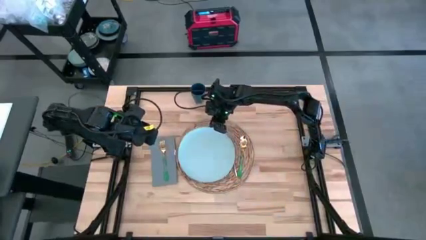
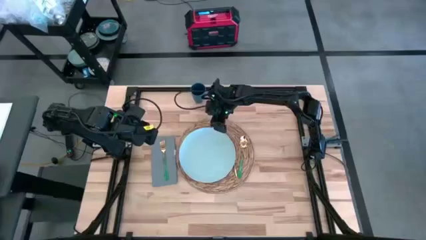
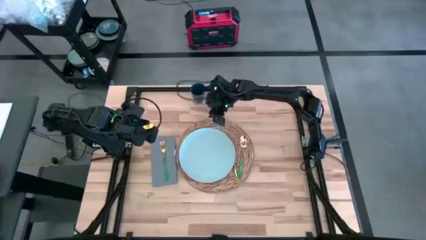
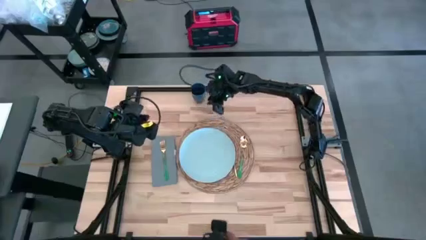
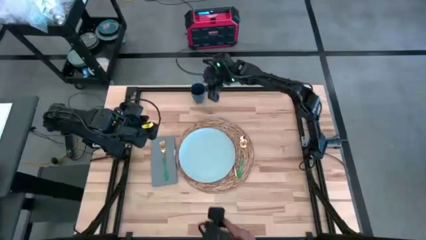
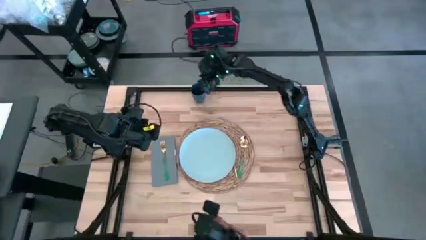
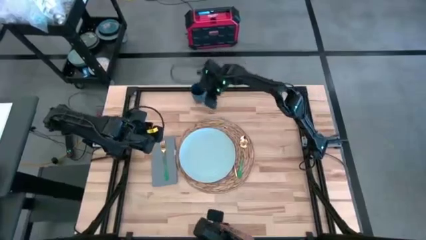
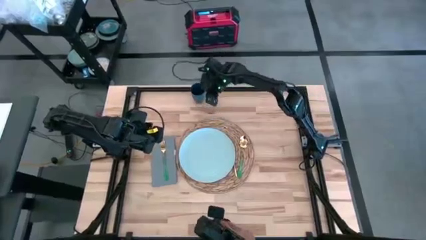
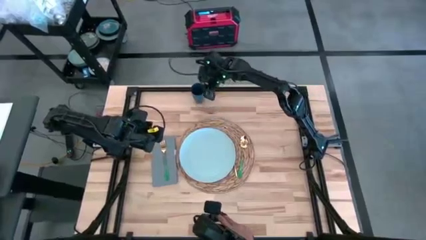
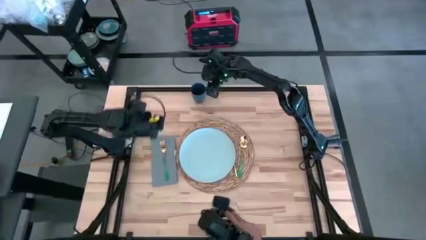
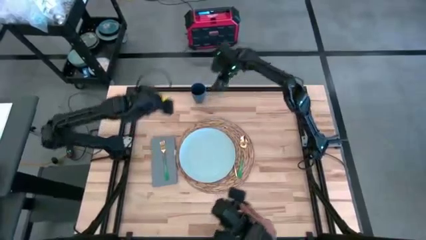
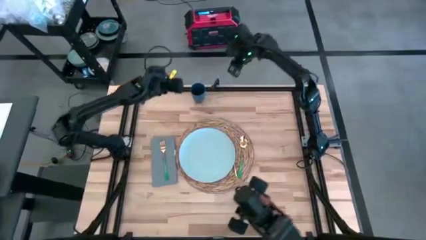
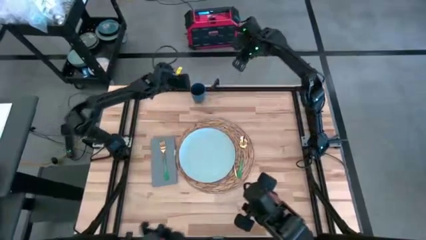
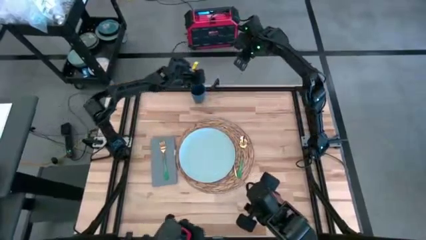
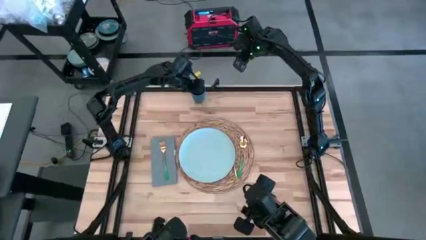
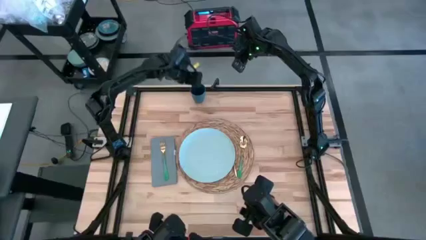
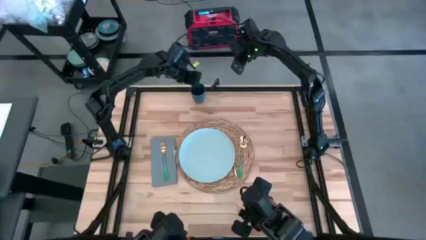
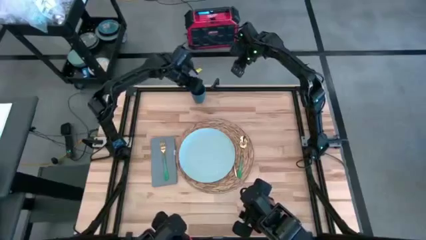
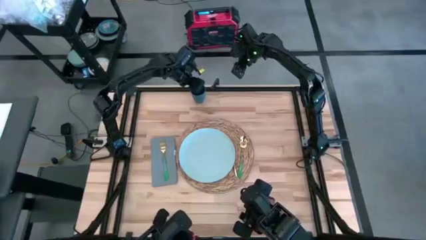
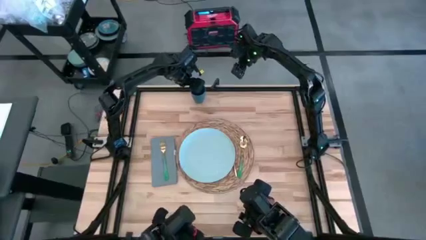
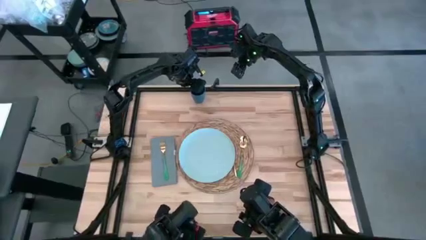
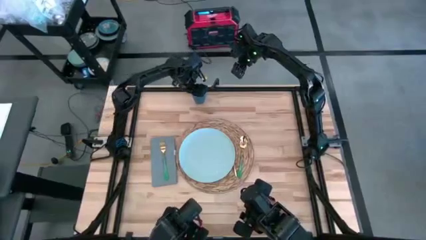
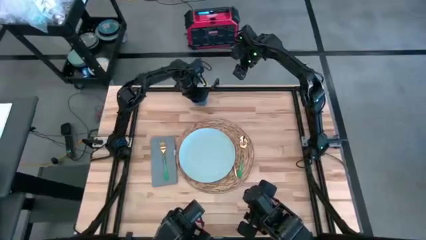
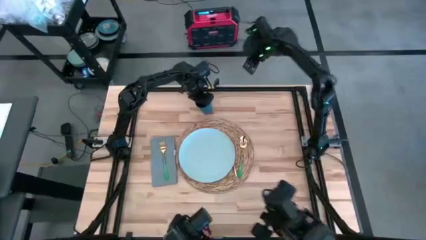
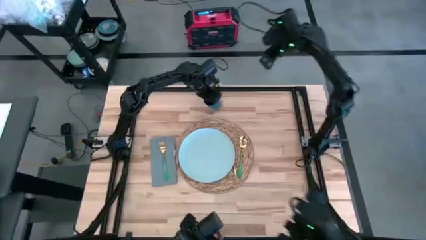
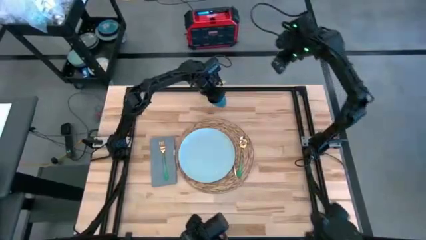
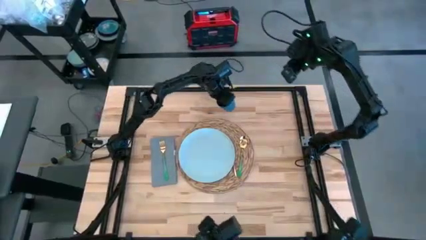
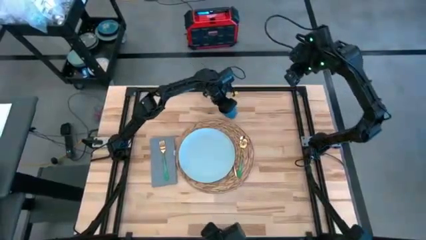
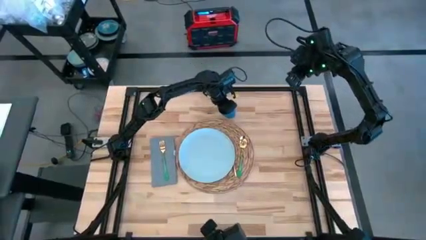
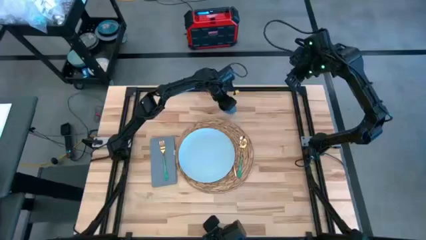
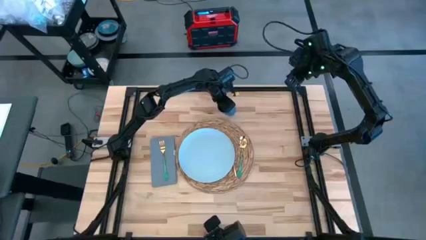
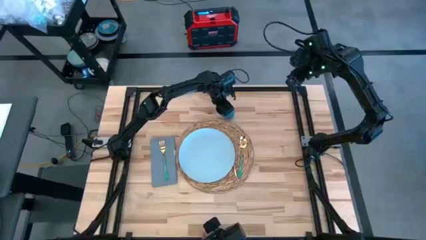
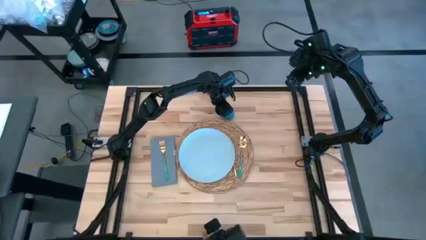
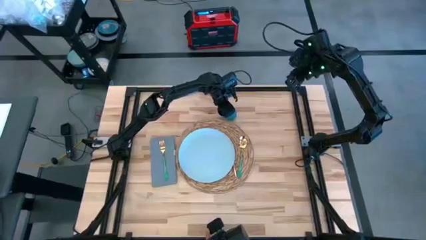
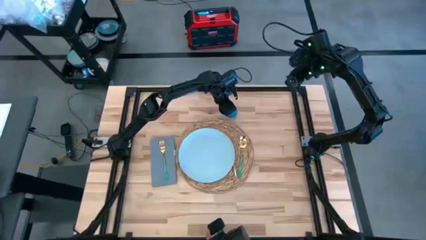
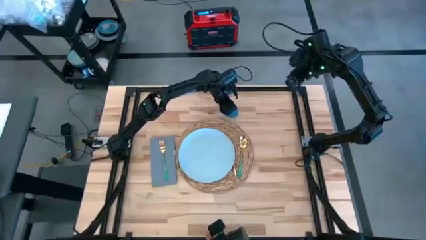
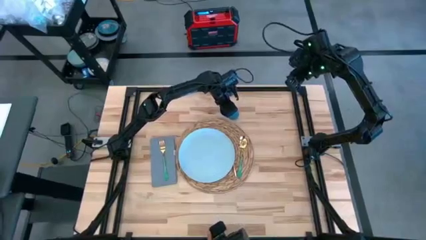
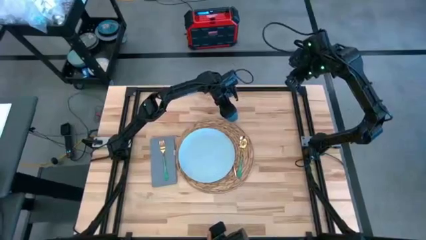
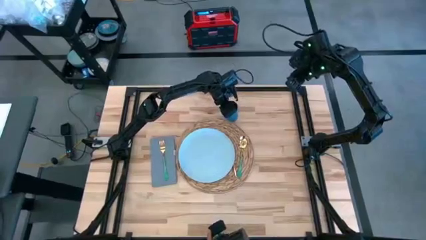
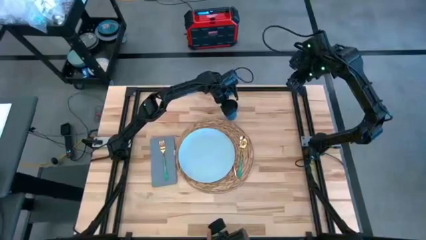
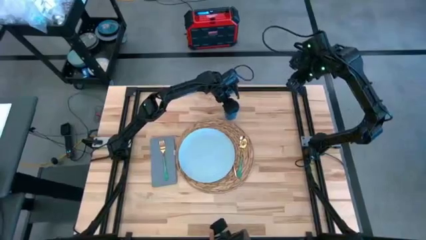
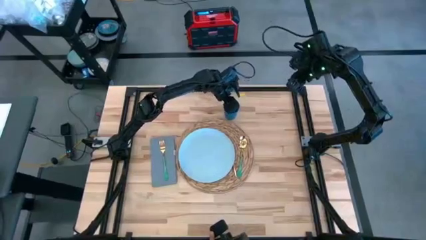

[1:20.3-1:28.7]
Task: Set table place
Move the blue cup to the top right of the brown tablemat

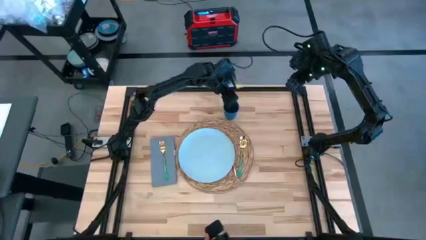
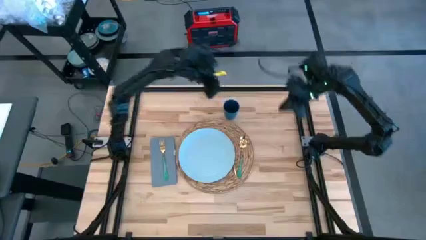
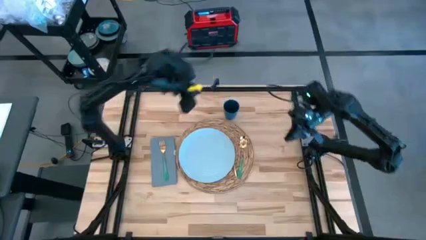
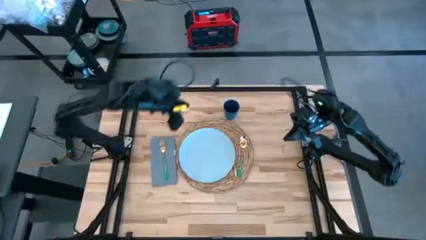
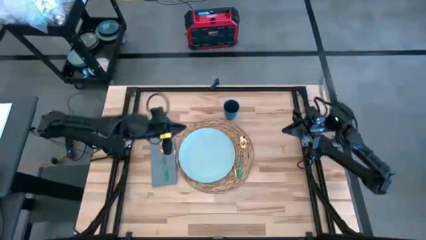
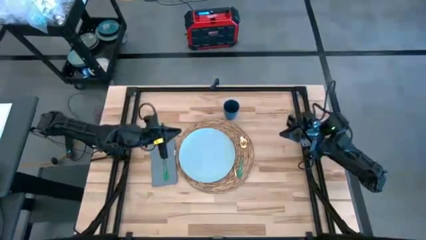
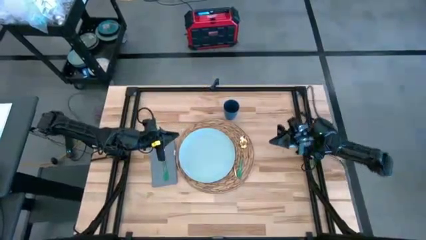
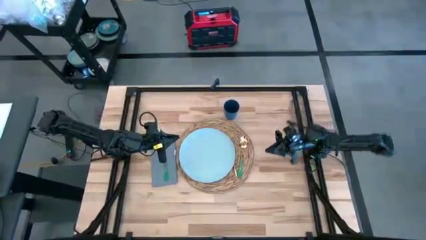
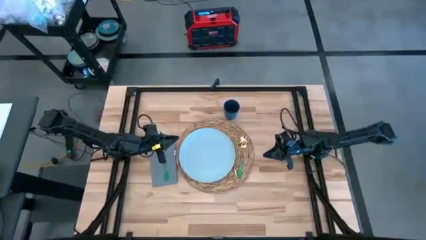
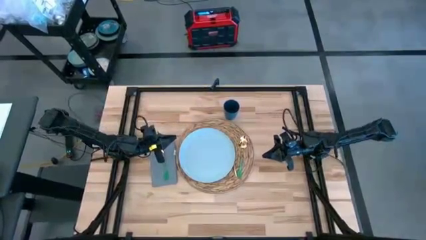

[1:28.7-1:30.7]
Return to Home Position
